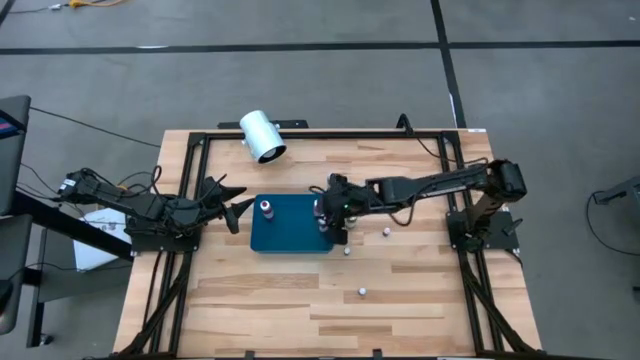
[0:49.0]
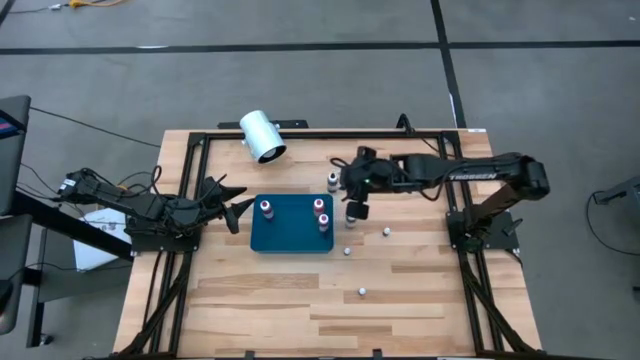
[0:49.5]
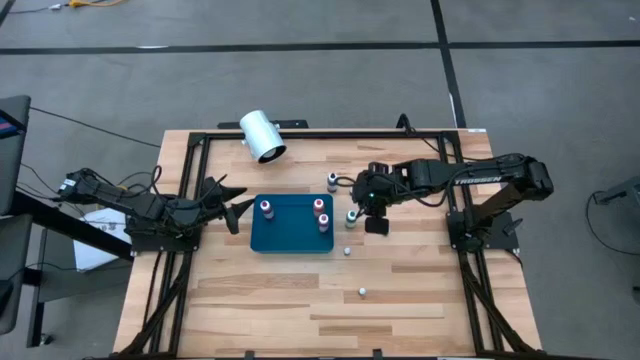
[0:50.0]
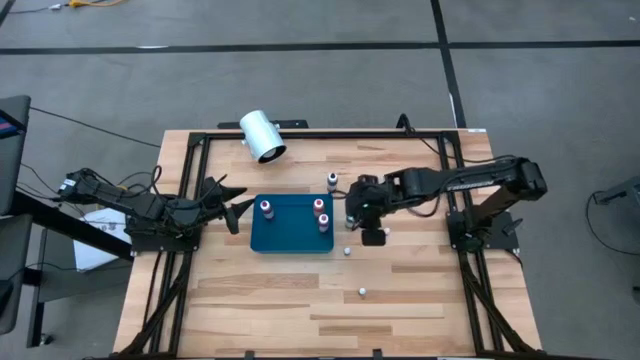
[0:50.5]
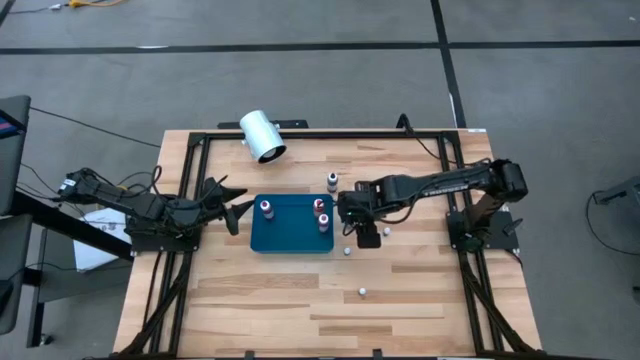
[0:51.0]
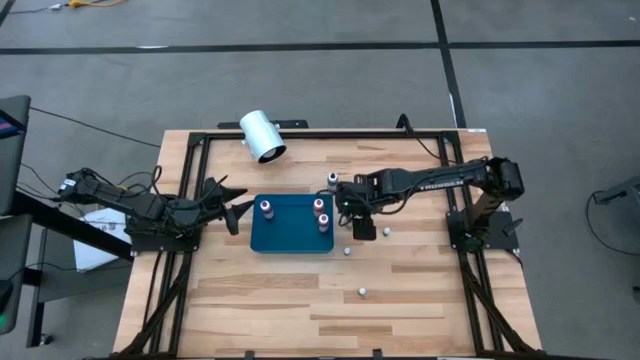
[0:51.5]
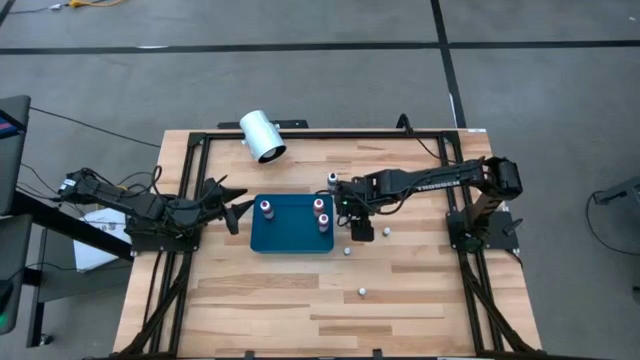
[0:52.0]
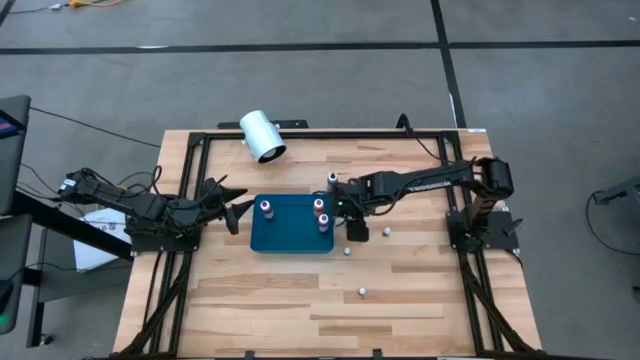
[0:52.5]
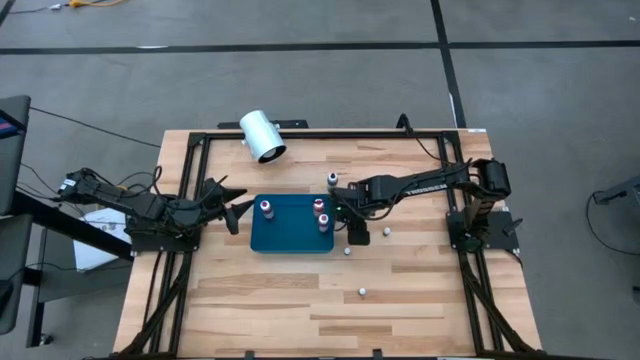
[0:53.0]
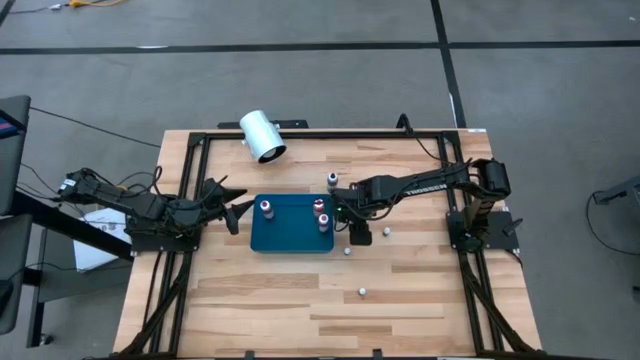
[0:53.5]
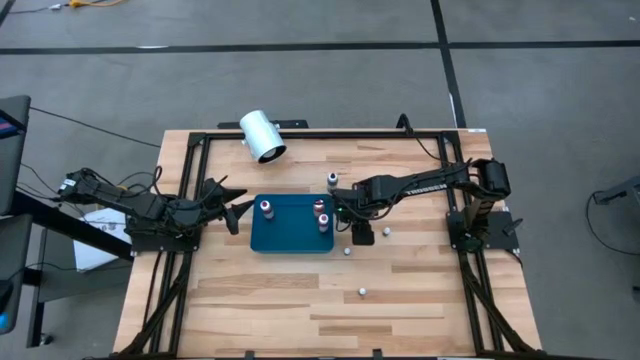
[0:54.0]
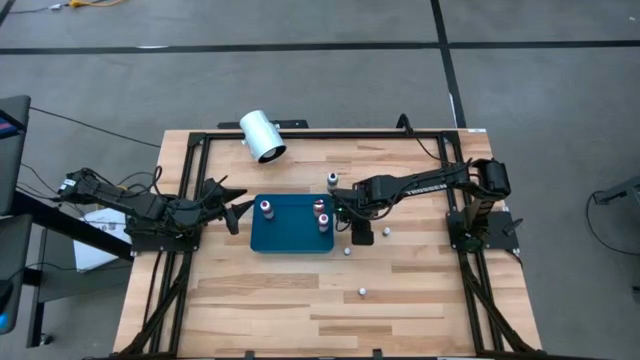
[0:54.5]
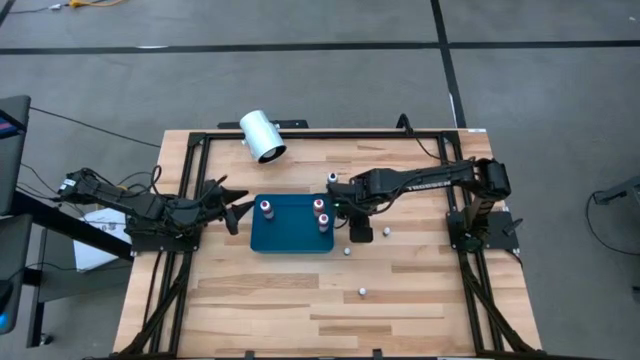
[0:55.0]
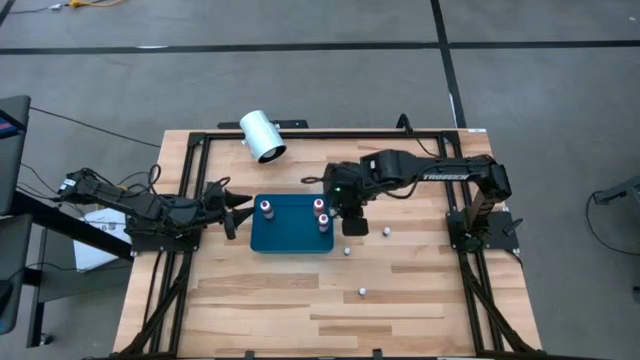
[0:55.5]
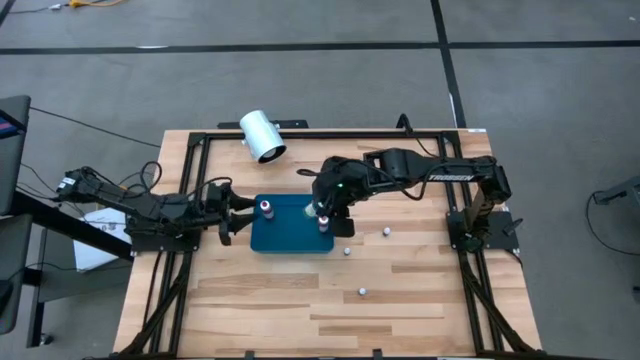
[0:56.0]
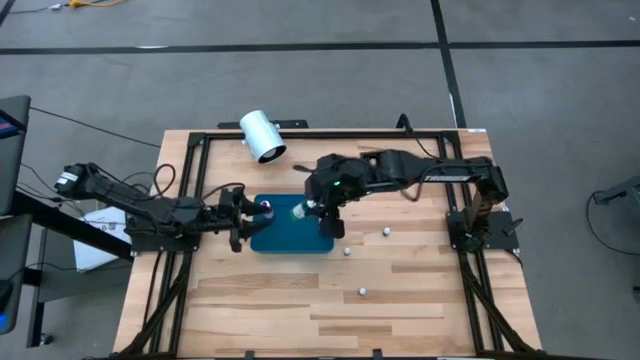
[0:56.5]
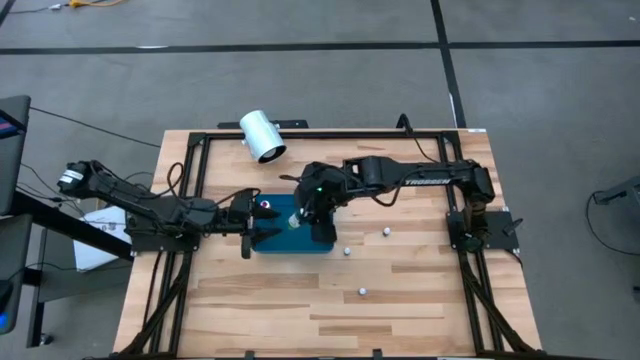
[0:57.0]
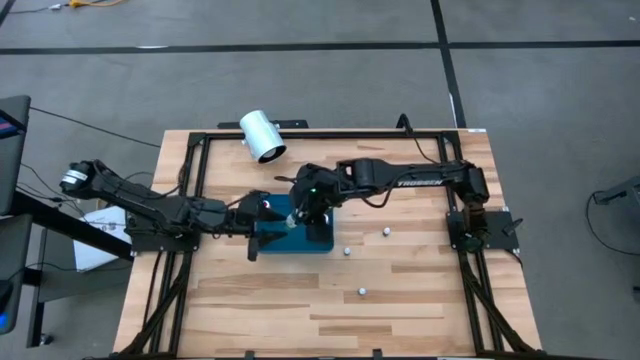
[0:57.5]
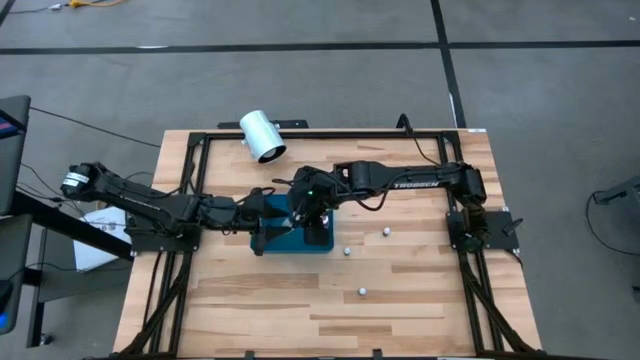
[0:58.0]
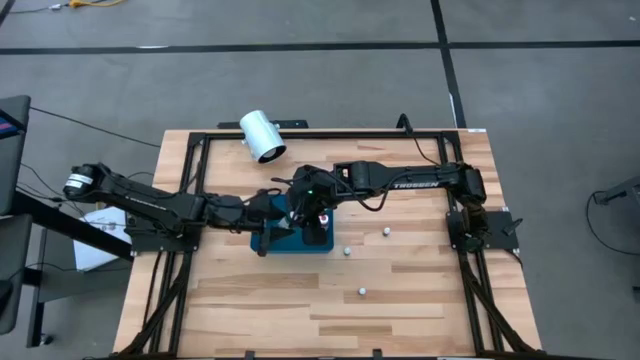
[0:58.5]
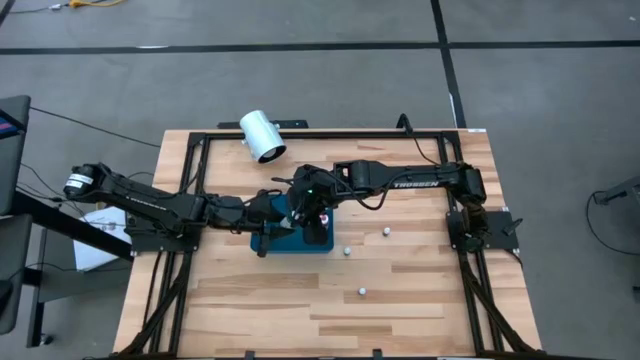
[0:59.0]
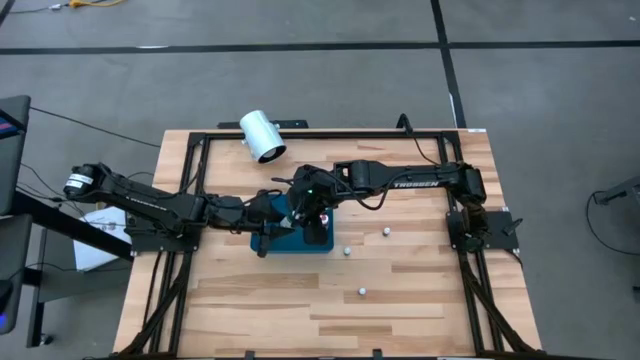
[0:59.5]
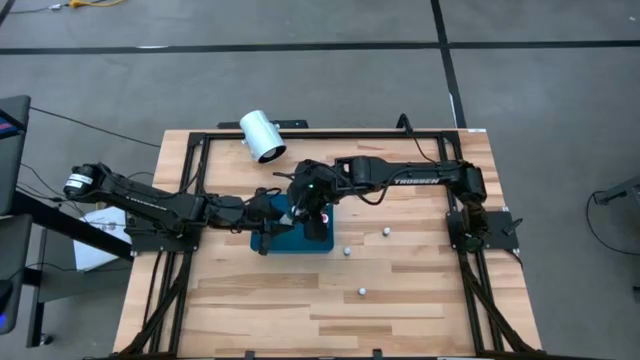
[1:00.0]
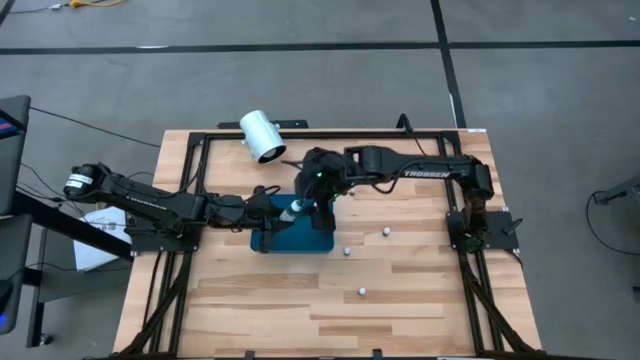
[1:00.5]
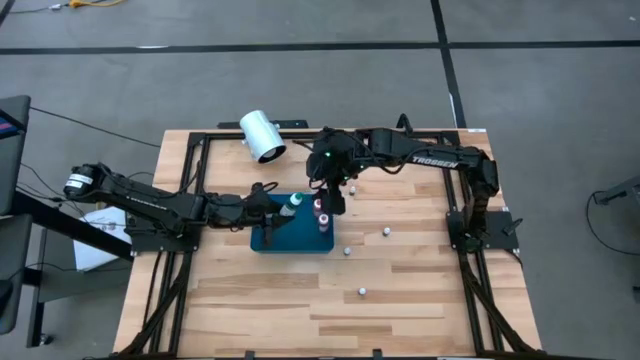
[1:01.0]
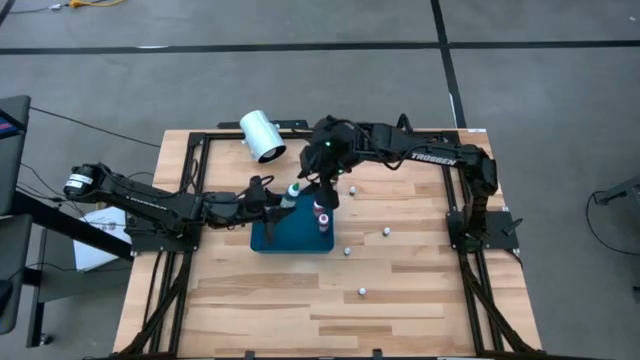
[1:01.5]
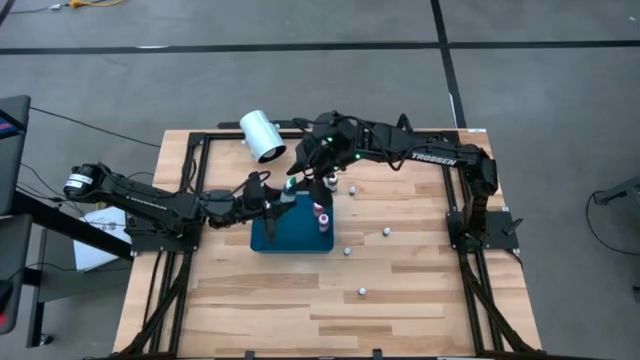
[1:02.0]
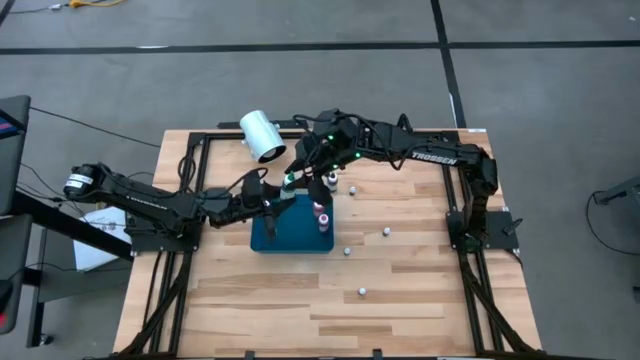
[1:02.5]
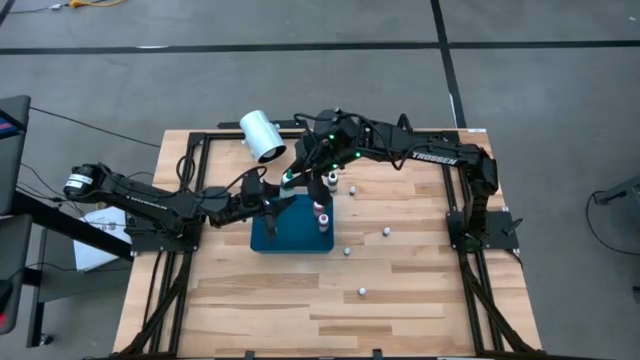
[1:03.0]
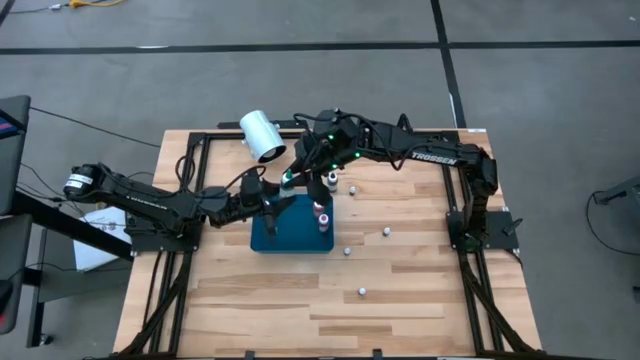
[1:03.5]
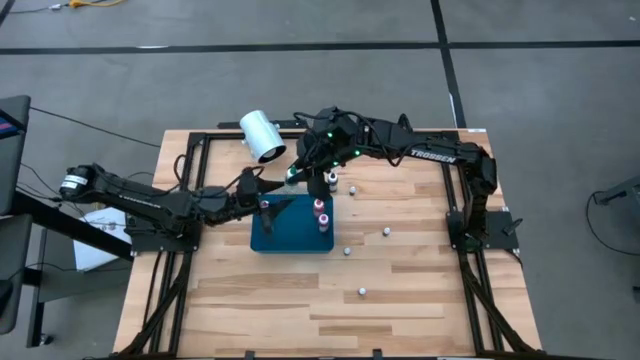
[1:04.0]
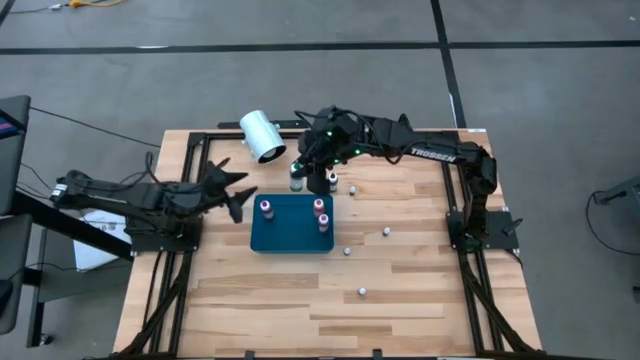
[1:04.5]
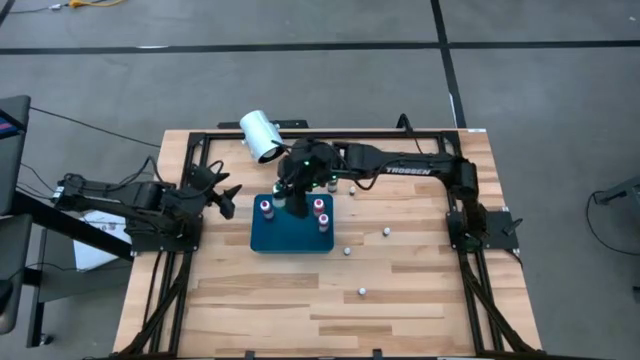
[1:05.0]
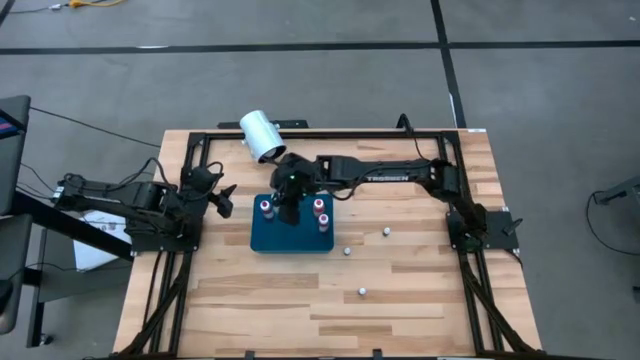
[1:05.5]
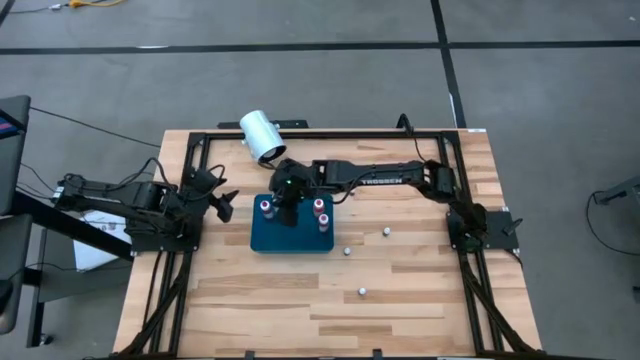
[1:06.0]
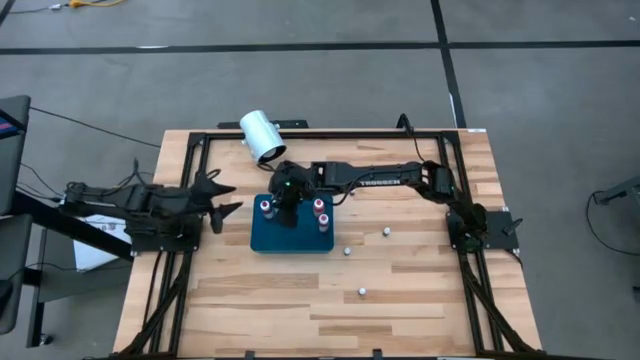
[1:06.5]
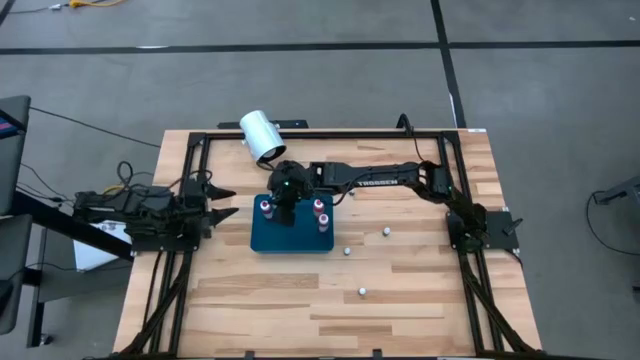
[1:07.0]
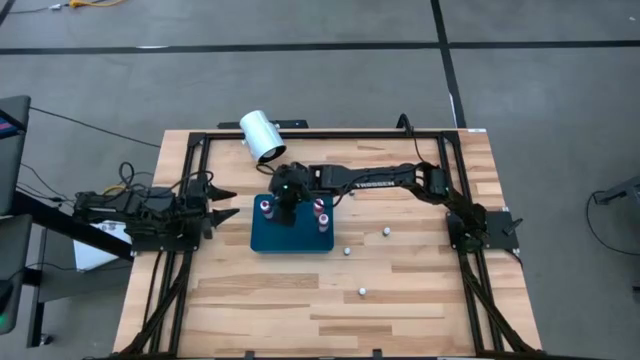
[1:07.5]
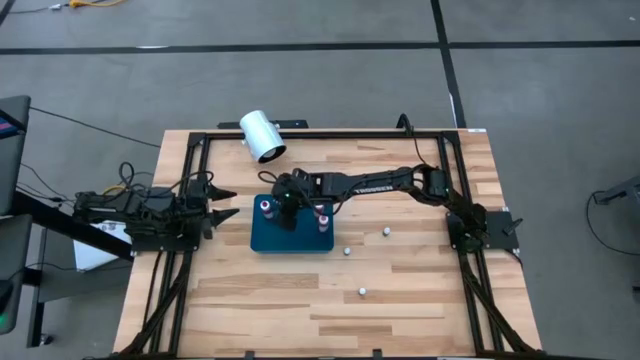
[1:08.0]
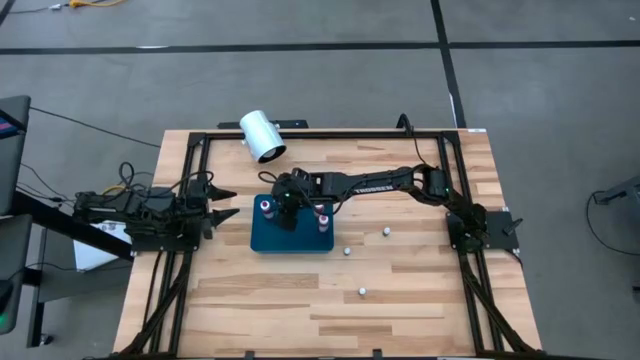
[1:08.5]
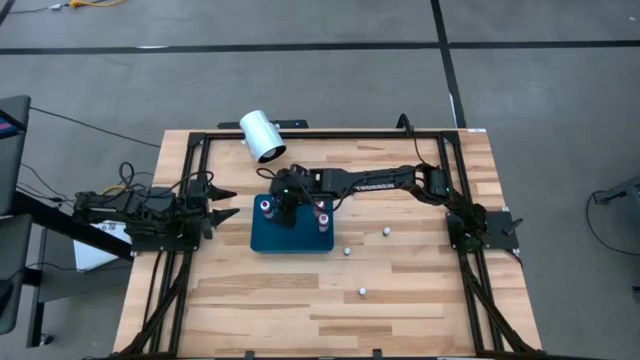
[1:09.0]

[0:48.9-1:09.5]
Task: Pick & Place food coloring
Put the large green food coloring bottle into the bin
